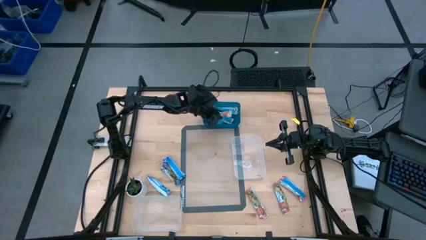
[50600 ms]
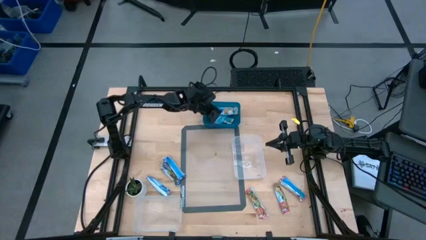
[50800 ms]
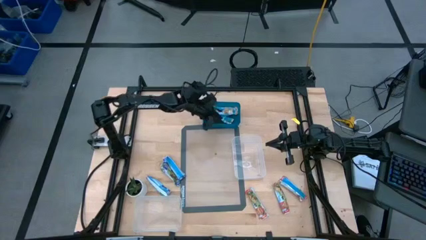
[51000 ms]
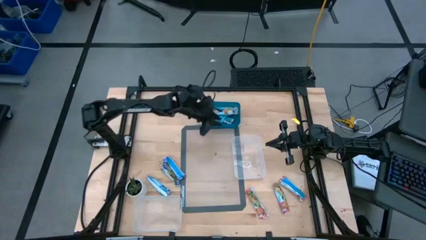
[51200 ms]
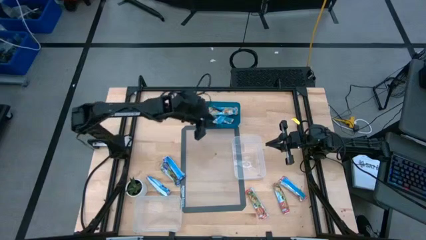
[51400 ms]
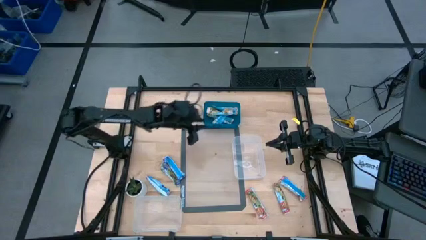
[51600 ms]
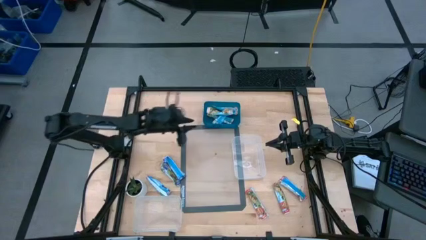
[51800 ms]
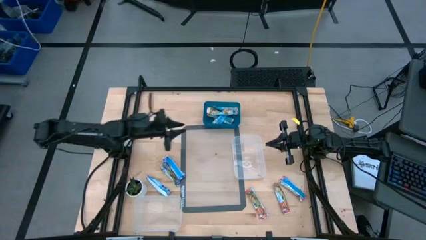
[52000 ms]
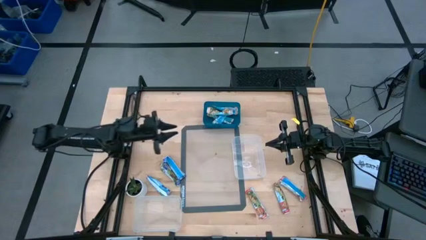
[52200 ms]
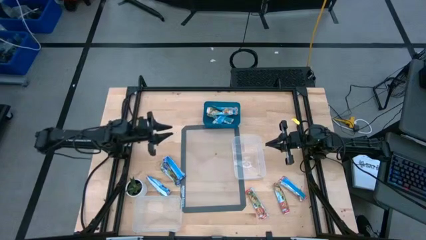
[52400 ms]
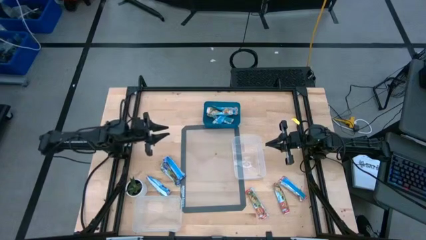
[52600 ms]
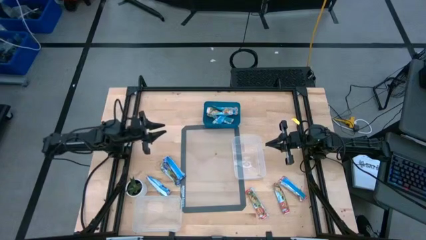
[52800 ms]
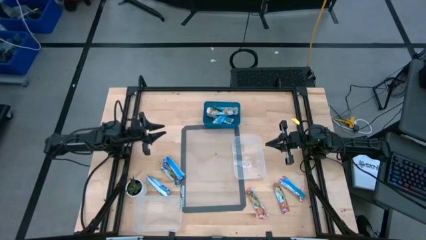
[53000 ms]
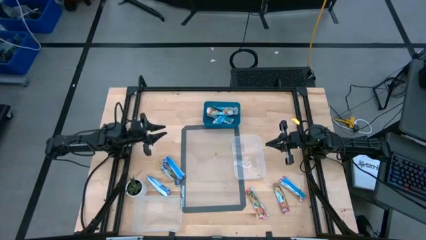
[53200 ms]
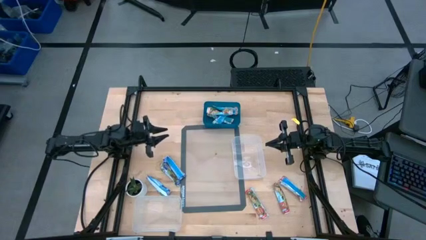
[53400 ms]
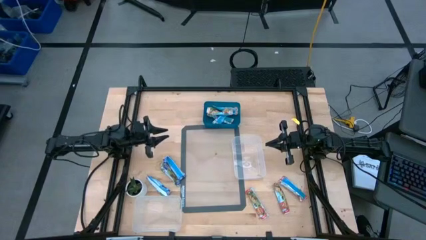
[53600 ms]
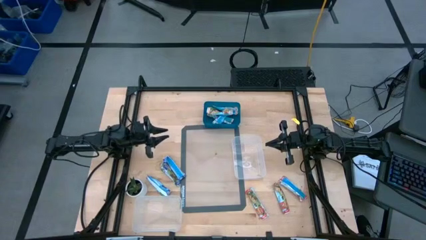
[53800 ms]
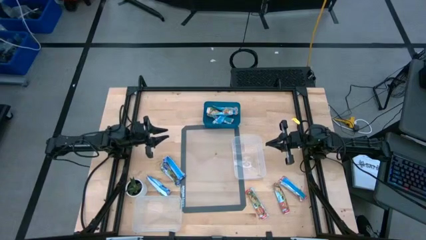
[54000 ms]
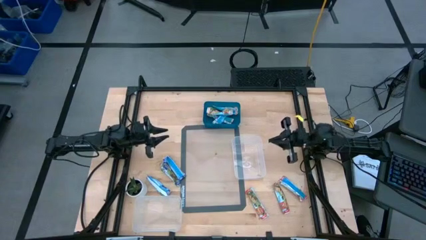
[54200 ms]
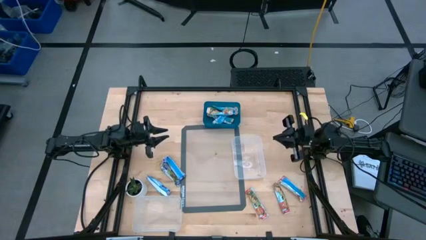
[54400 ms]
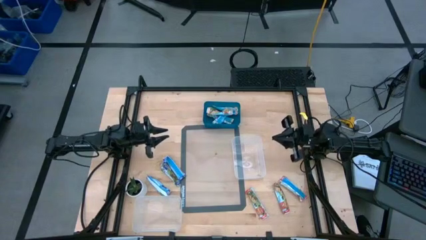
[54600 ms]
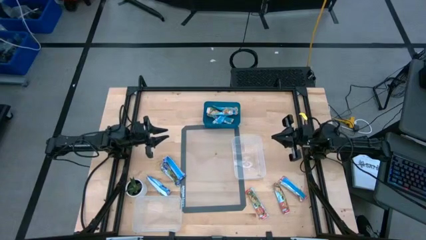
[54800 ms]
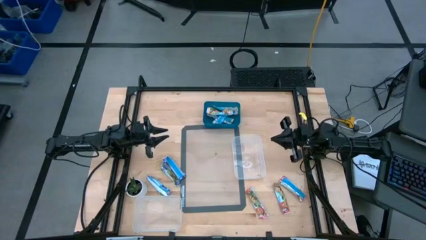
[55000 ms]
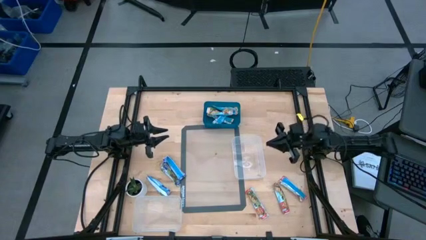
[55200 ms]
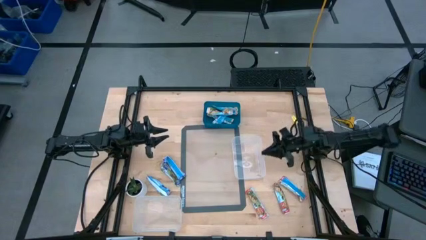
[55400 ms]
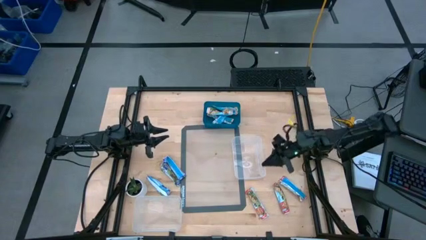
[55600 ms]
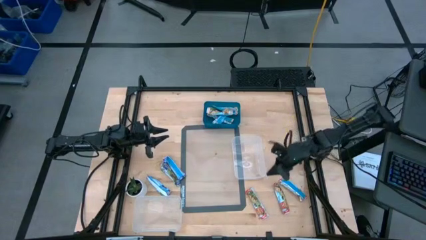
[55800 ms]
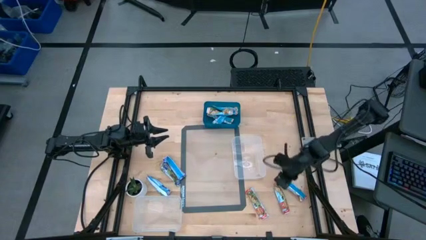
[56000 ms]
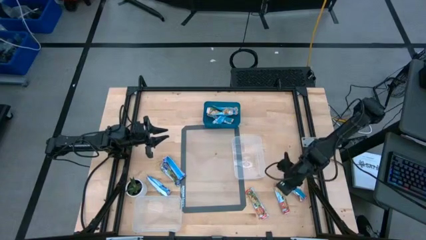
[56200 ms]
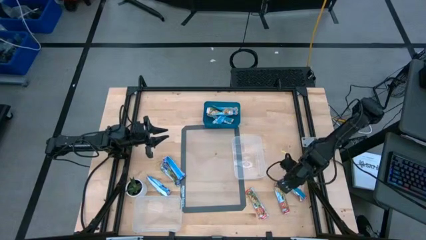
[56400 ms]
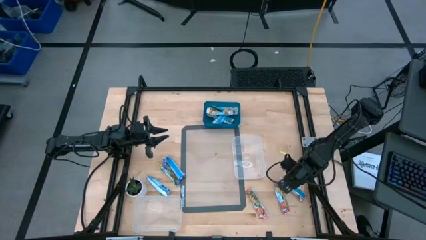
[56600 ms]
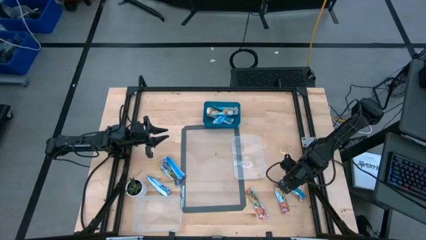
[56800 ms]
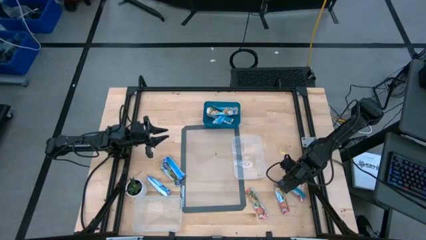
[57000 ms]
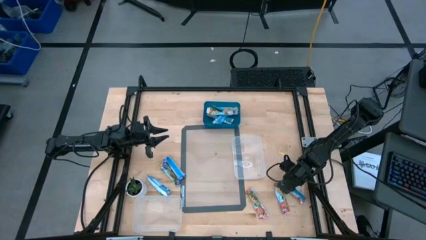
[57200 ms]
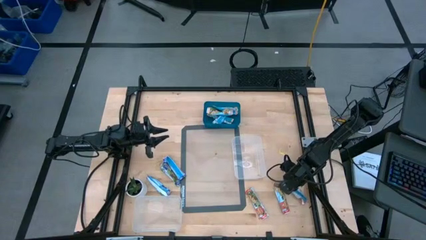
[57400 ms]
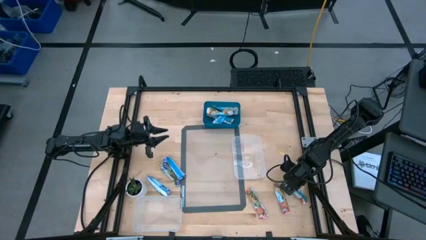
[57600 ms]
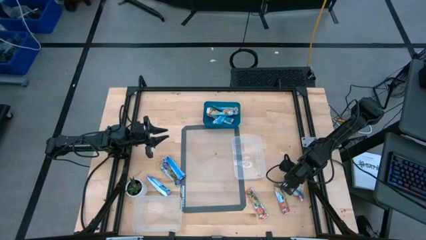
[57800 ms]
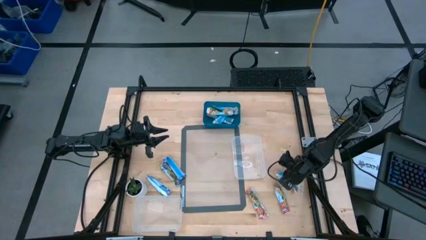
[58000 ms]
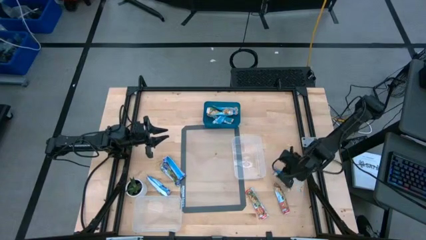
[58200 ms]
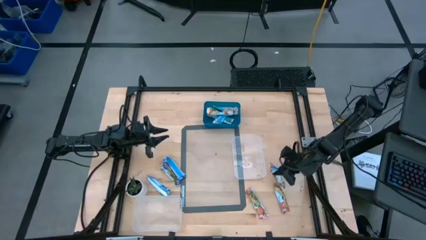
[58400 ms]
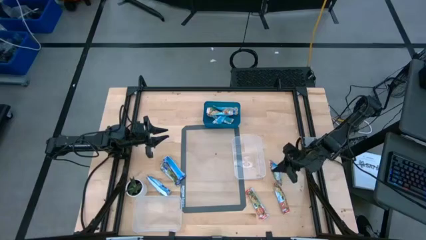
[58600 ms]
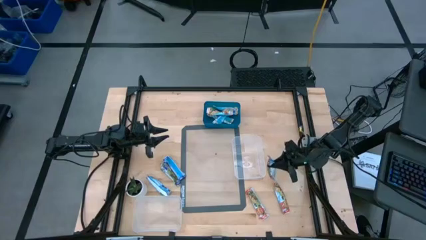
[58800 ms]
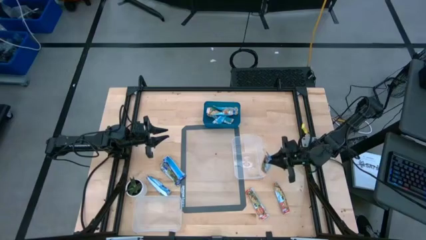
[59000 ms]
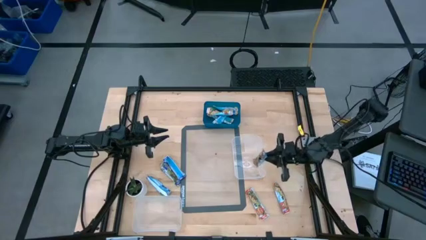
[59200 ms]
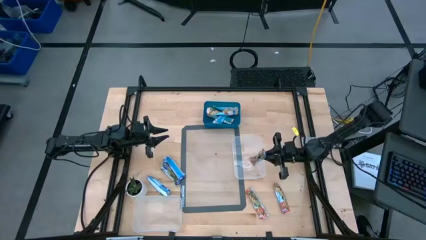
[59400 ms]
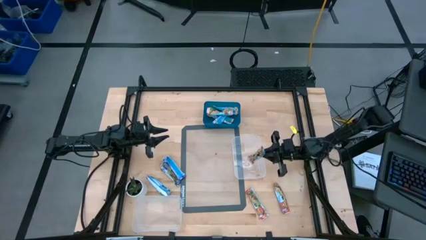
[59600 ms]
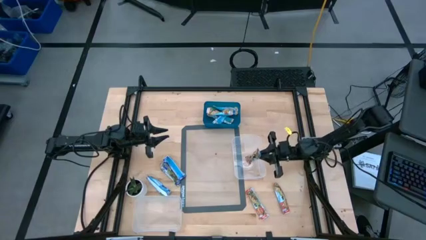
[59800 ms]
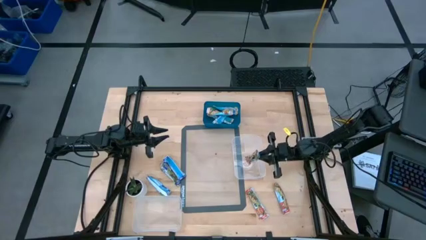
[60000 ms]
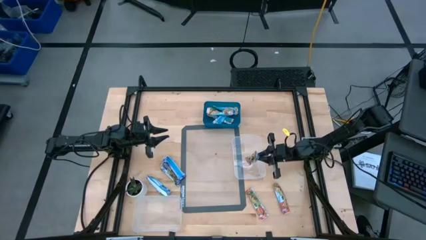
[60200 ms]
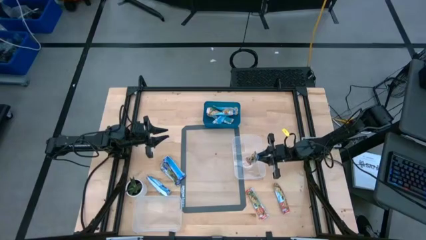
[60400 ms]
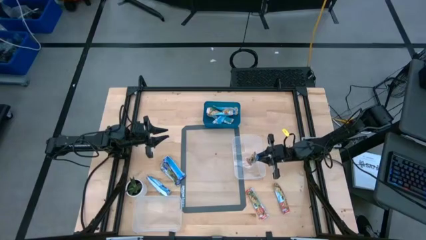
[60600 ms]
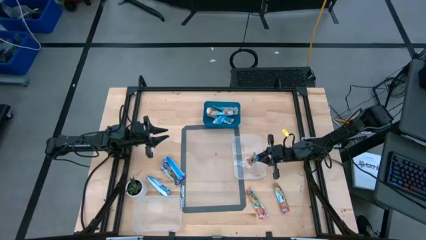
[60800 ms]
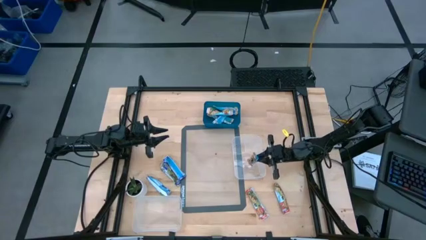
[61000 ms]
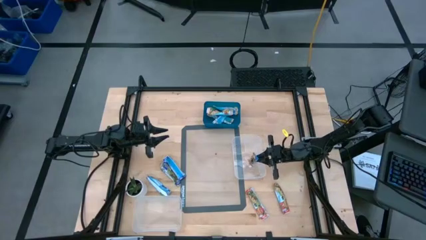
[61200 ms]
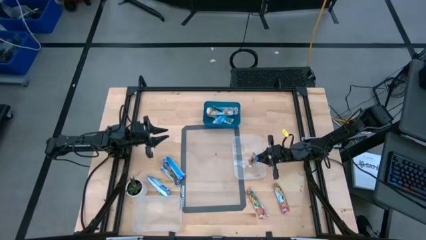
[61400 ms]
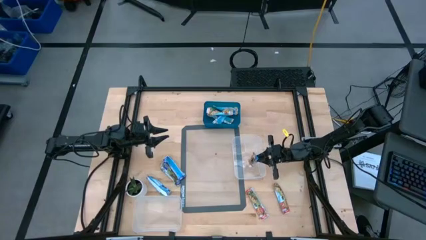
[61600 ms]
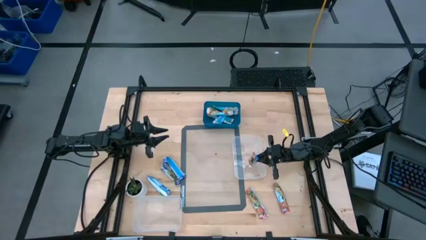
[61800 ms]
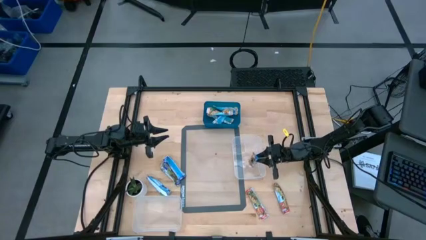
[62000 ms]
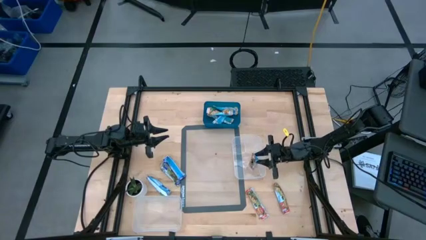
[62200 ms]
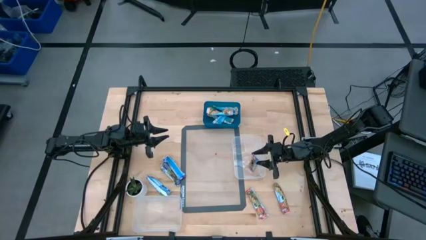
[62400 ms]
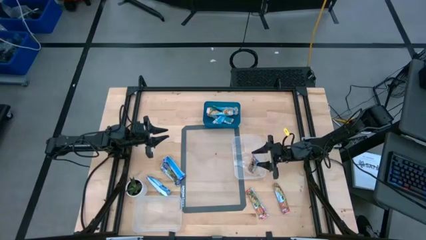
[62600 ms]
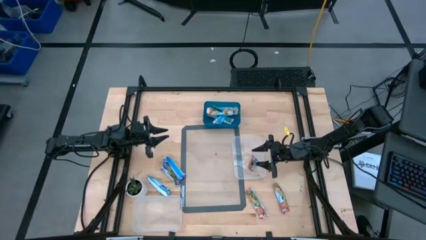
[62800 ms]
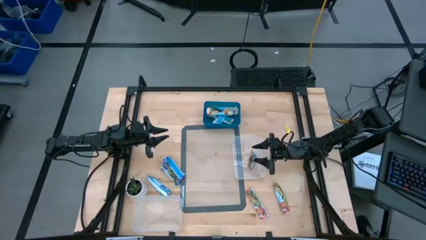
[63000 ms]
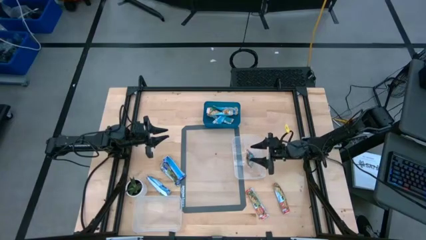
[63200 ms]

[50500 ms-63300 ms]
Task: Pick and place Granola Bars by type
Put the red granola bar into the right transparent bin

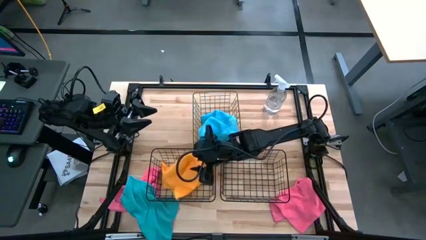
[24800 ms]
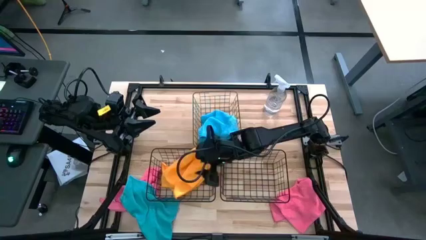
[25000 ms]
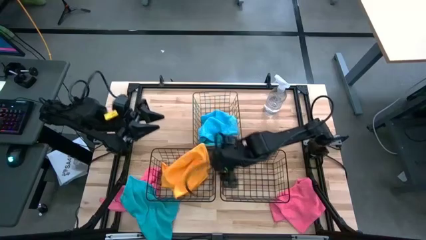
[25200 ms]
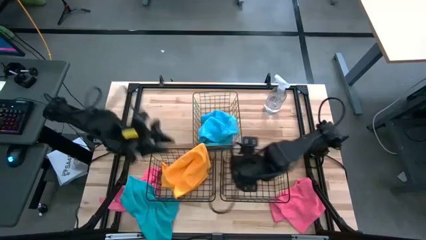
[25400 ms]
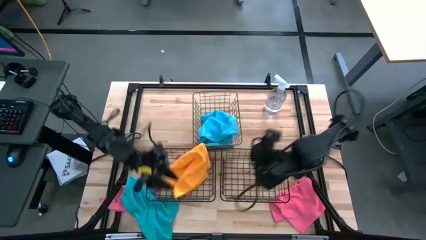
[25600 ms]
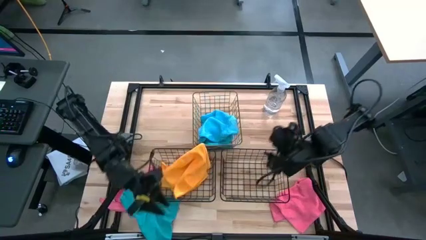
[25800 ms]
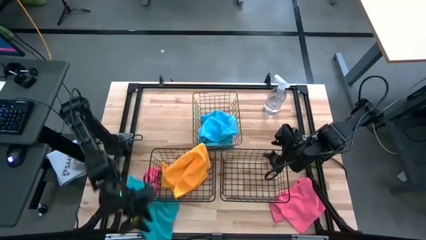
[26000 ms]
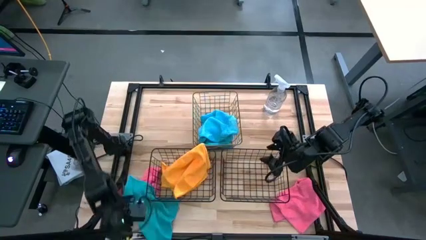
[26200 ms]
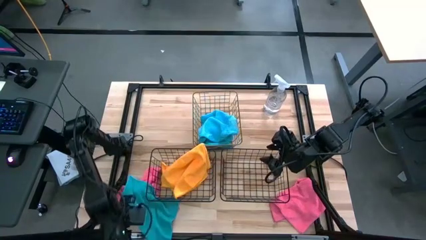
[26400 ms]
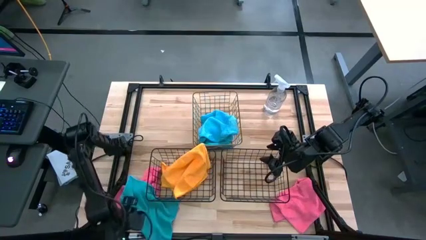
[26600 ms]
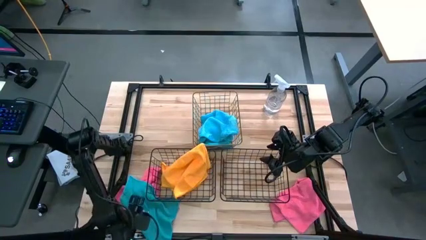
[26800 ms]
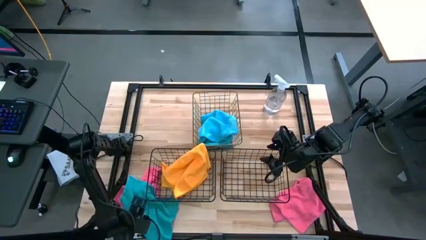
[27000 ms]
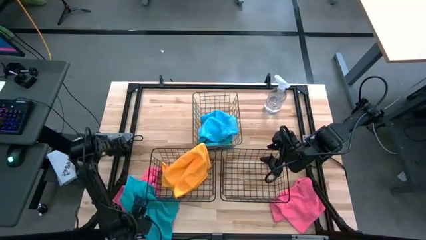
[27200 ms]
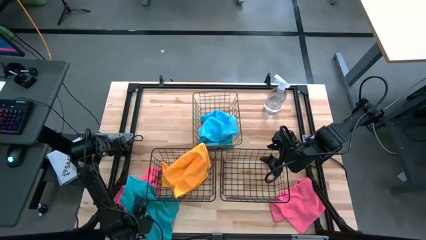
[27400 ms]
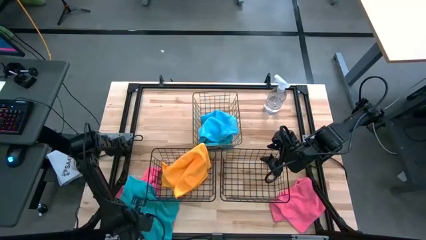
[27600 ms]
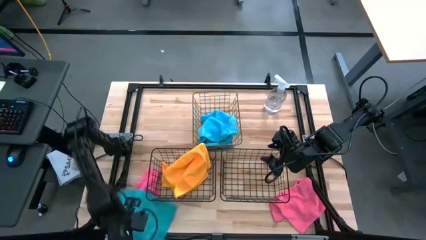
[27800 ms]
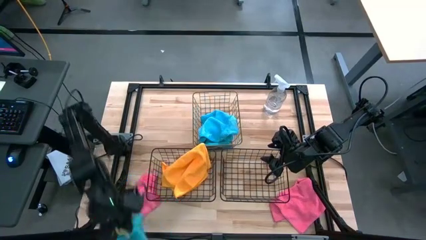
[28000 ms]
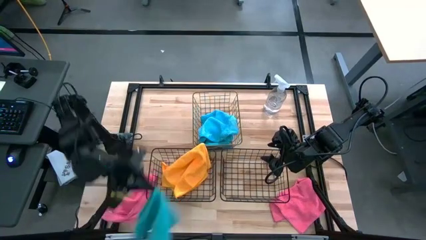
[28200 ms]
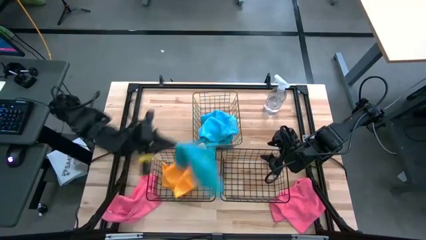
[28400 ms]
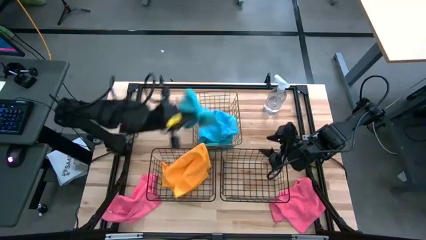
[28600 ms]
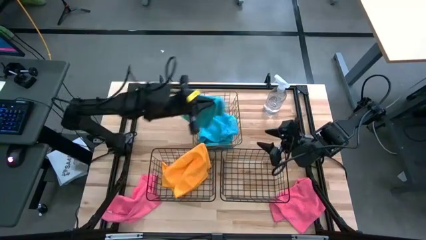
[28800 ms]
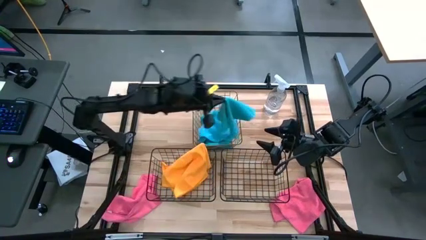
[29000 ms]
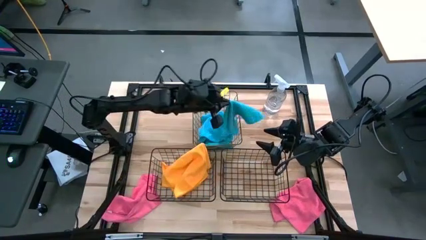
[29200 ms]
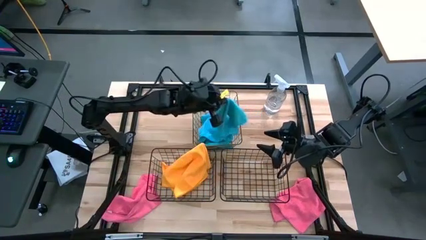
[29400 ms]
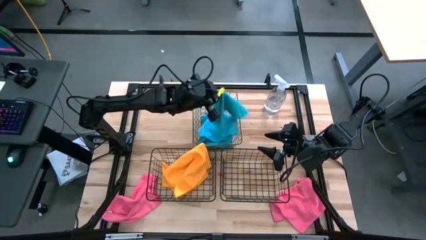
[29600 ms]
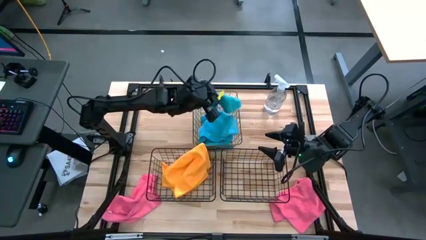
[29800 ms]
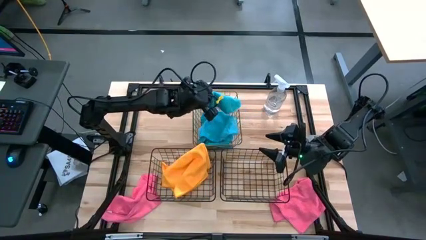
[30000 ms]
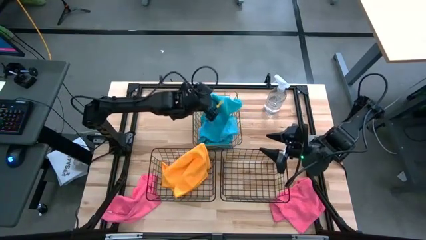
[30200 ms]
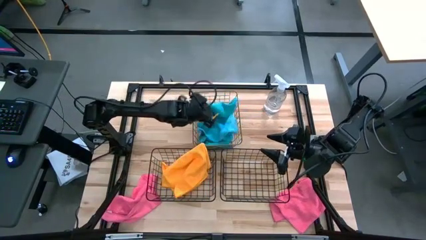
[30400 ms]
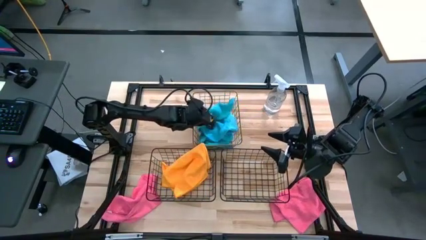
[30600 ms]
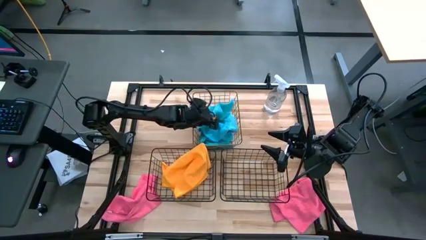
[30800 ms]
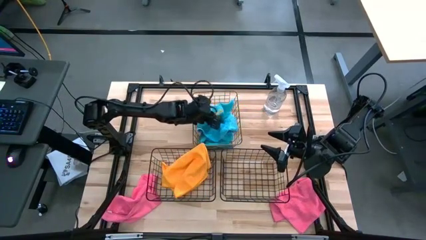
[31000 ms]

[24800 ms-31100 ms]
Task: Sort microfiber towel by color & place in baskets
Put the blue towel into the top center basket
